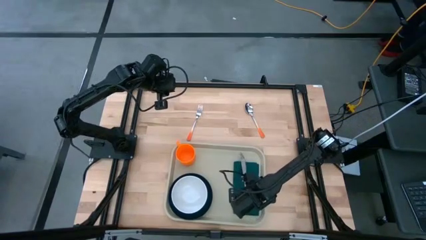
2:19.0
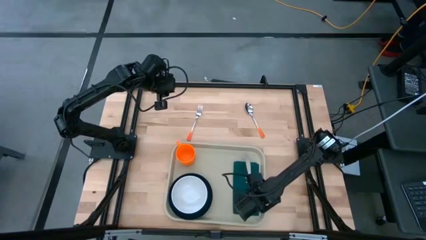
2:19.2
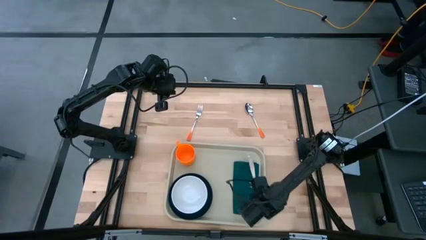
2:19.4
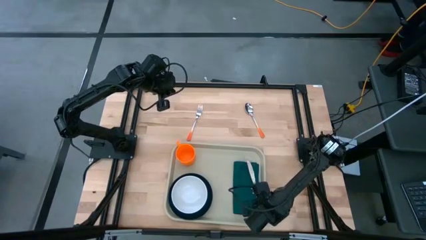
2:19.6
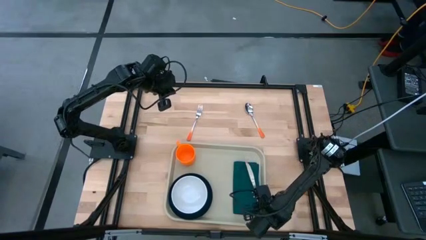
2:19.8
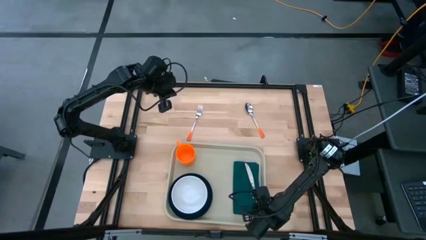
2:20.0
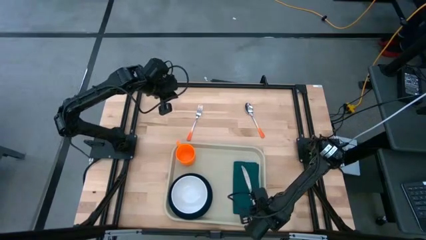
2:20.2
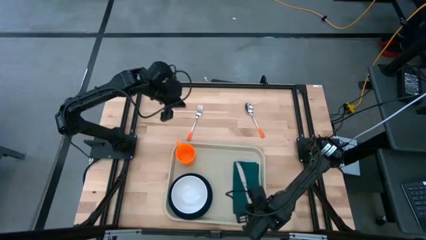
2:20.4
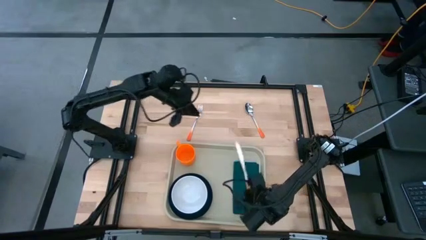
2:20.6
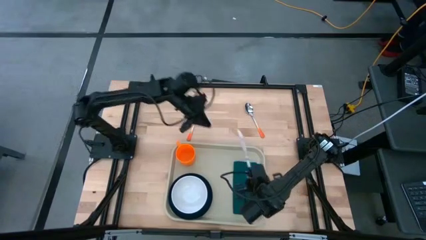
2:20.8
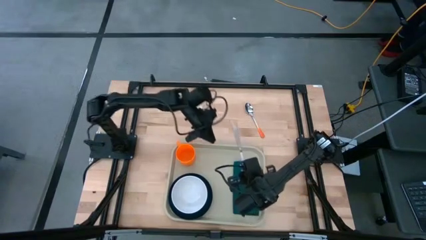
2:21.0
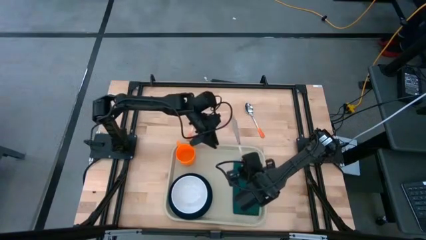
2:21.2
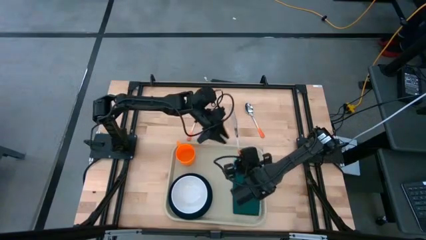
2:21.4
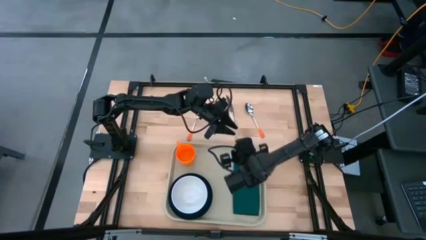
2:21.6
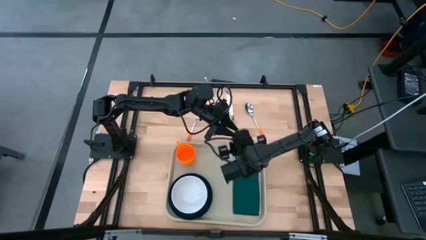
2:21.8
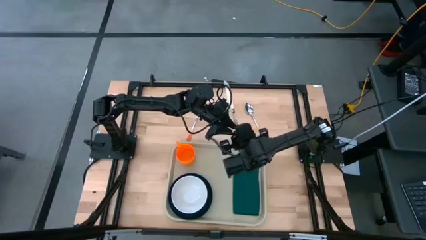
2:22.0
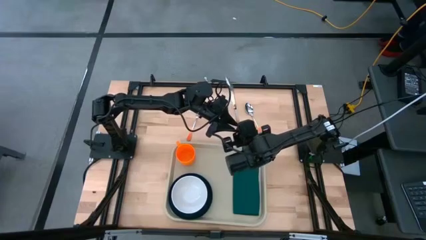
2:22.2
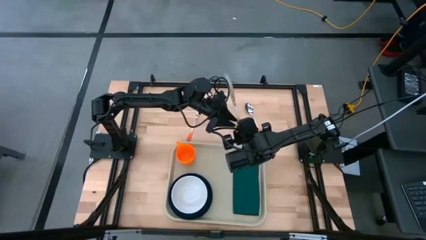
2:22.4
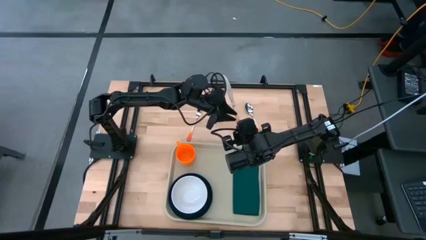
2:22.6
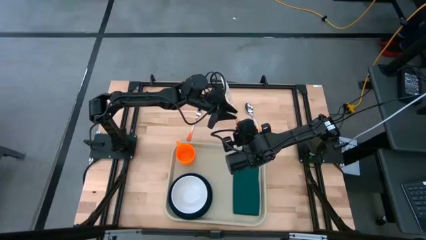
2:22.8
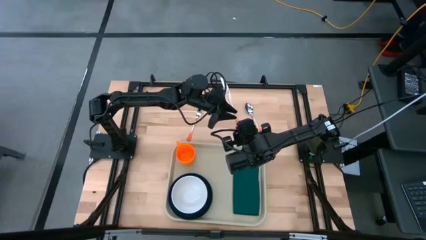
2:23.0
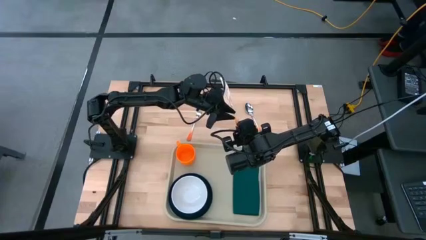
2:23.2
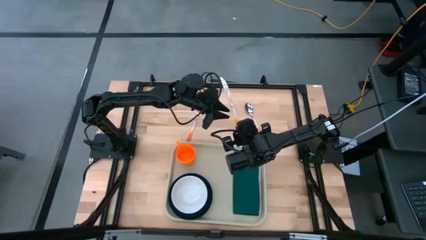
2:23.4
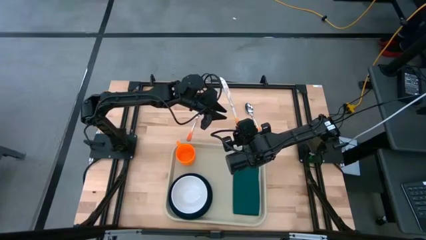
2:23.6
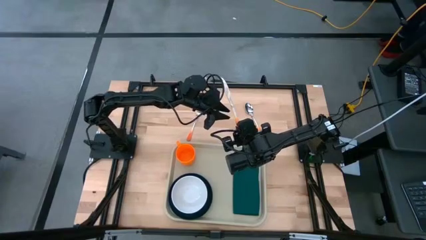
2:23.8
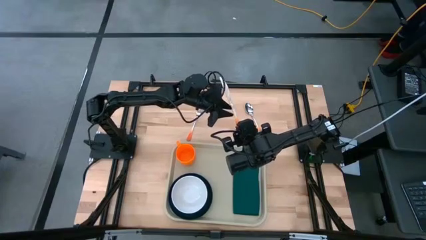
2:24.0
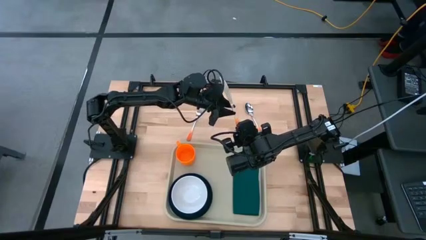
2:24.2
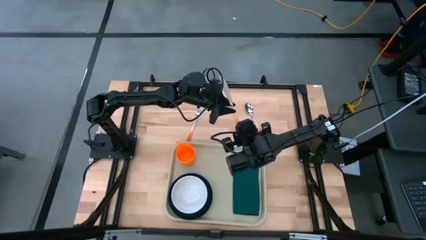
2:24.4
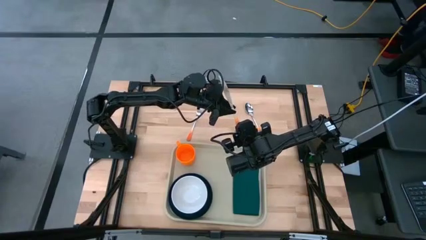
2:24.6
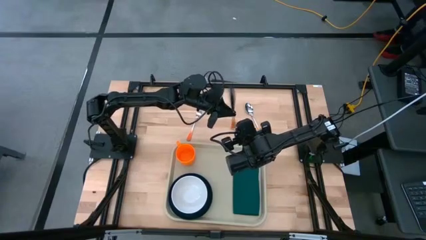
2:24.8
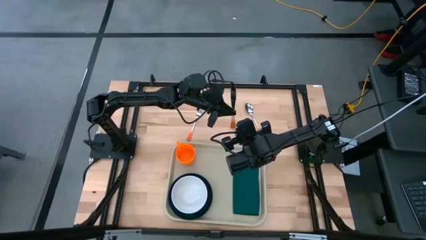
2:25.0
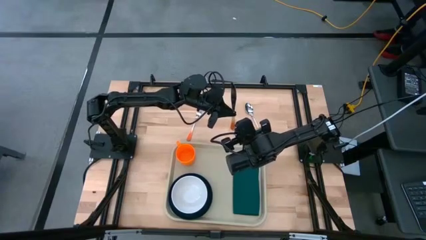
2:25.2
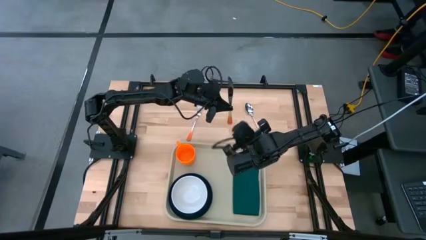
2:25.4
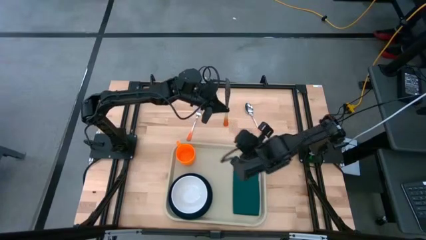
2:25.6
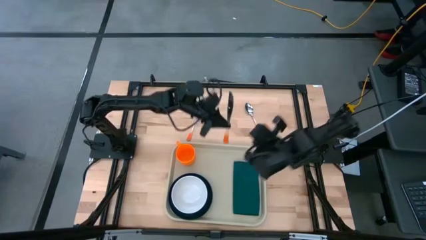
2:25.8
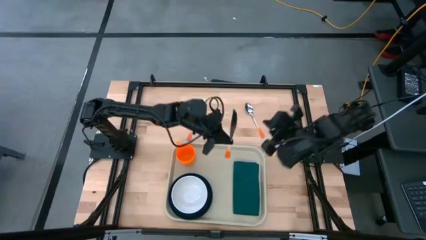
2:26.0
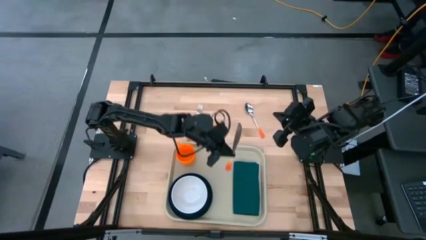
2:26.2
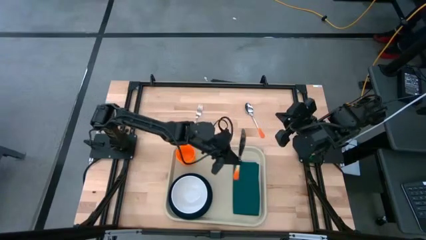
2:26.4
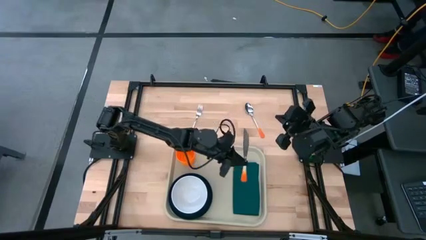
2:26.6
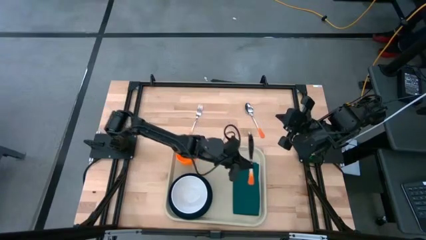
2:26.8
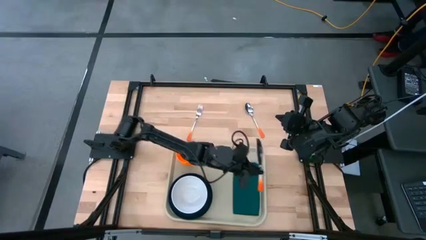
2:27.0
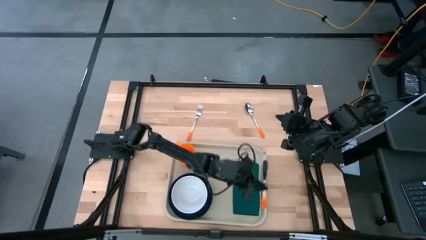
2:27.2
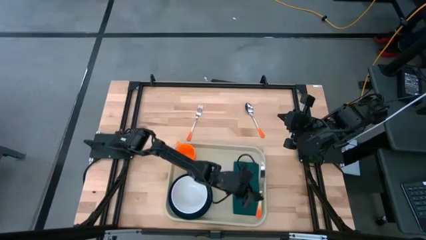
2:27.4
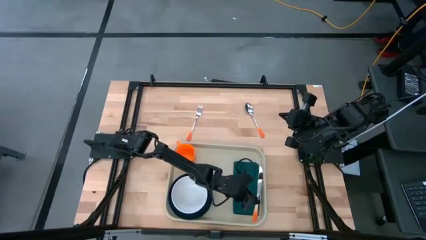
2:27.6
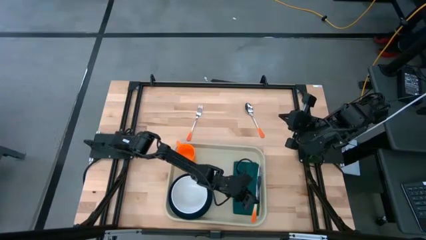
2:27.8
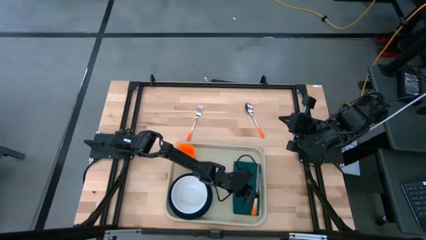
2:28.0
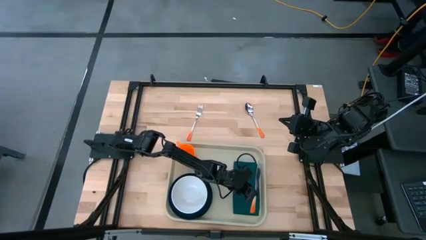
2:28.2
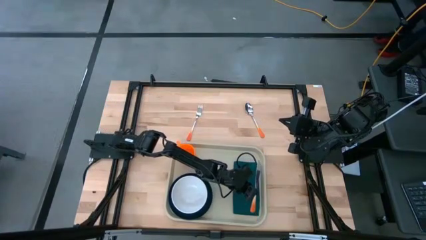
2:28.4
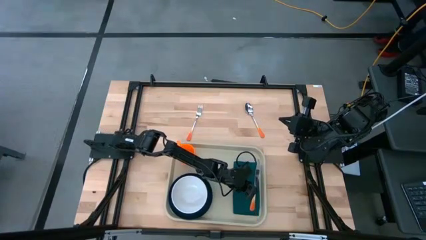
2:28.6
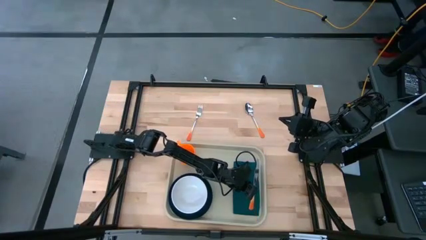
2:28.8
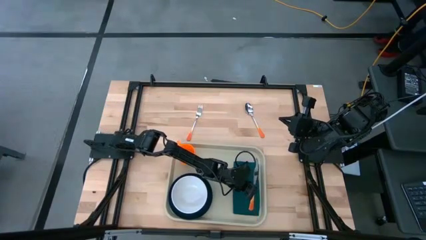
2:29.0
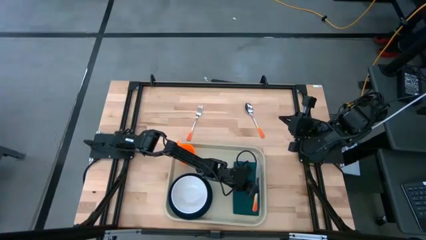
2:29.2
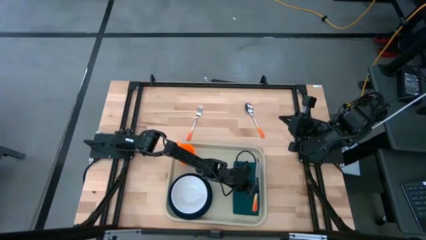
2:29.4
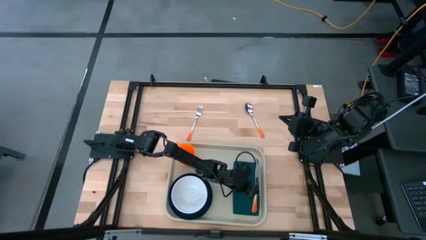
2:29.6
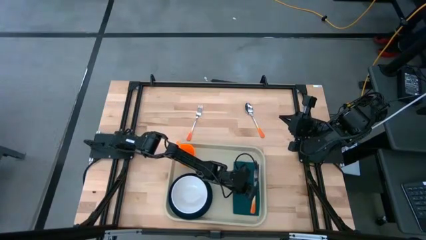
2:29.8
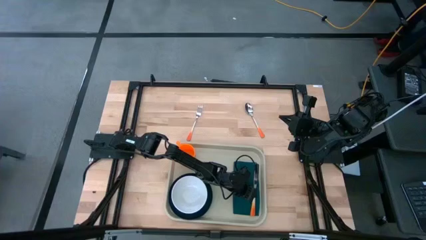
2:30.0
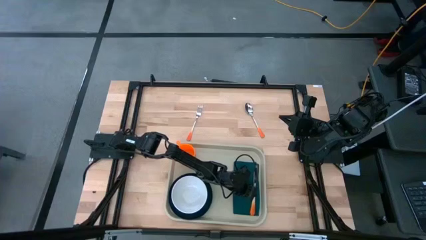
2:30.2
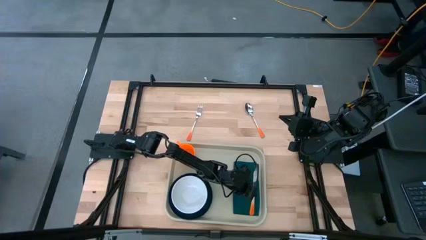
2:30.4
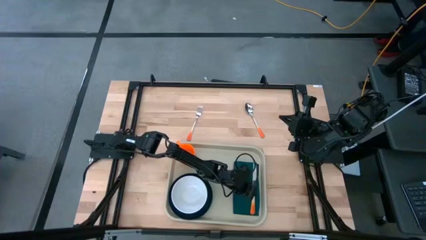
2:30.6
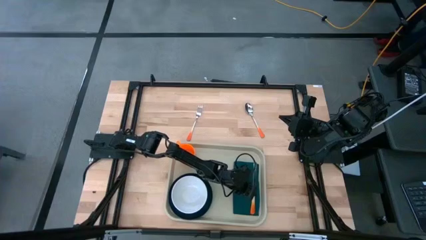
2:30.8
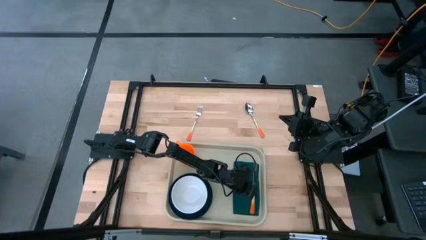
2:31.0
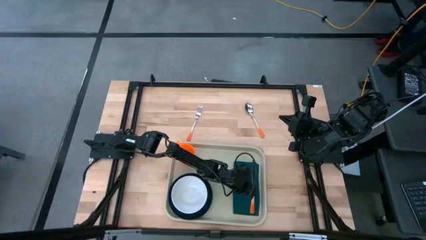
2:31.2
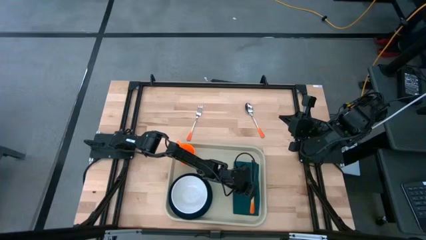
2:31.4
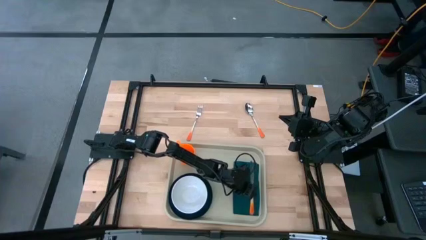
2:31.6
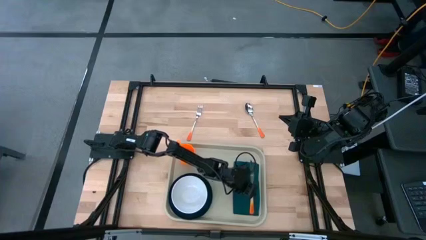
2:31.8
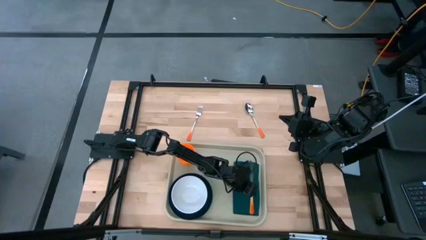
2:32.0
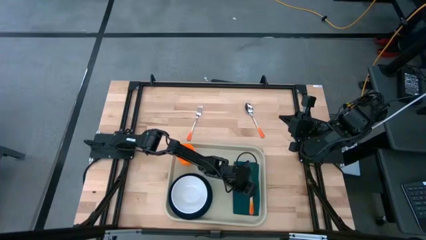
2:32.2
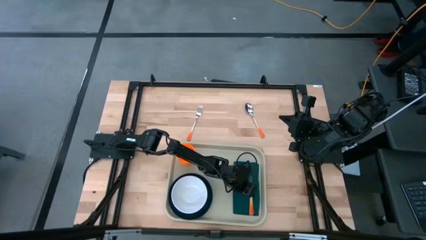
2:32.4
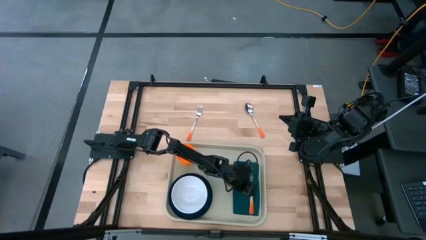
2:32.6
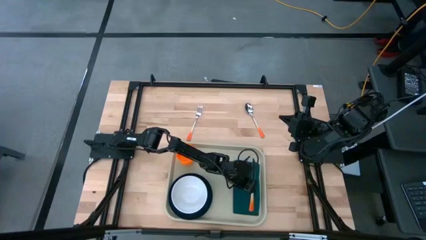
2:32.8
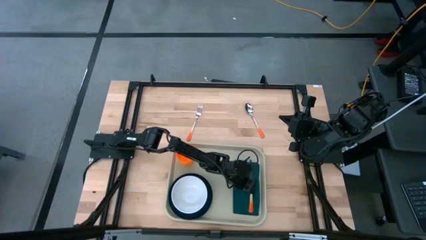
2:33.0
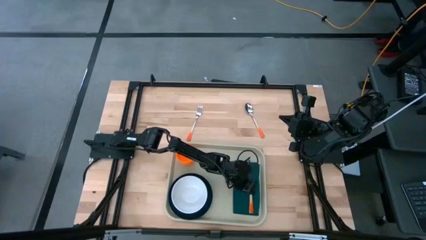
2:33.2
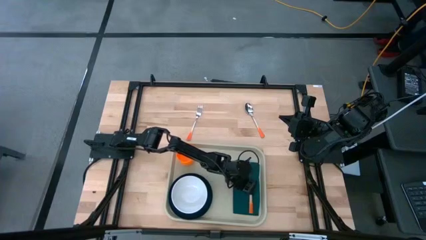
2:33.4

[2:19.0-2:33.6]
Task: Set up tray
Put the knife on the napkin
